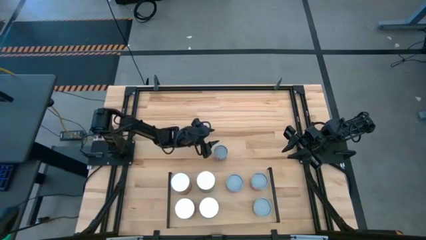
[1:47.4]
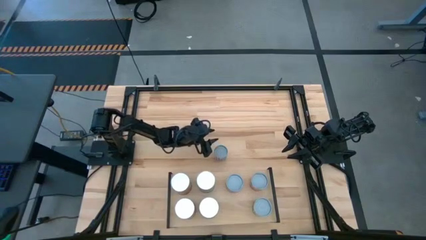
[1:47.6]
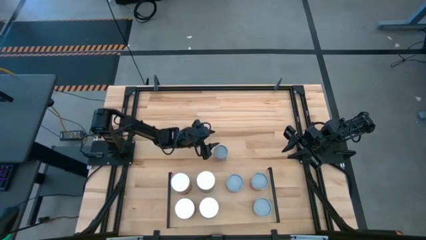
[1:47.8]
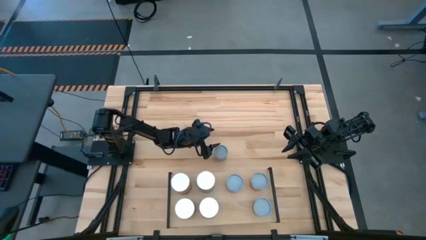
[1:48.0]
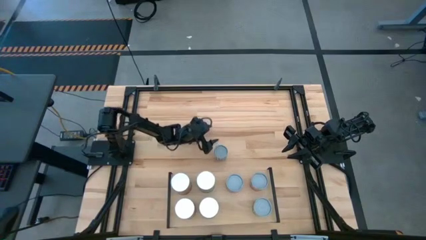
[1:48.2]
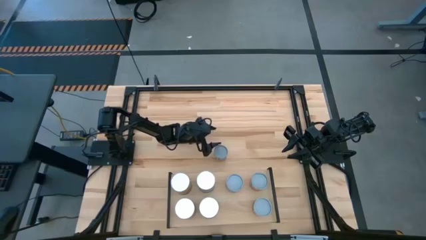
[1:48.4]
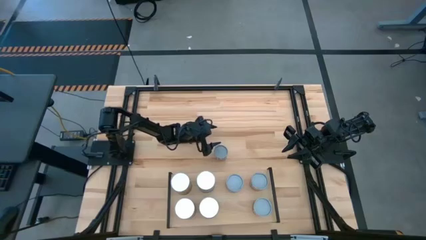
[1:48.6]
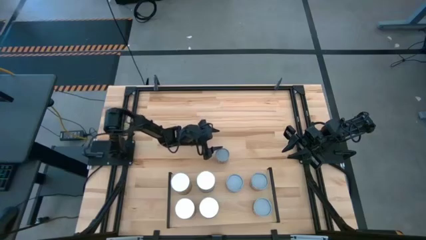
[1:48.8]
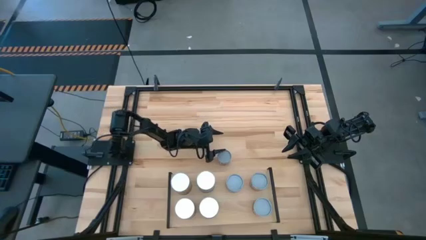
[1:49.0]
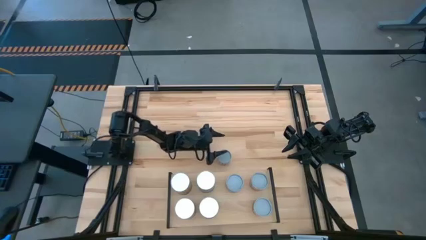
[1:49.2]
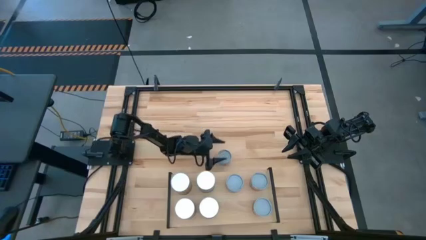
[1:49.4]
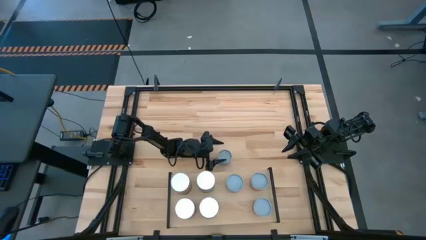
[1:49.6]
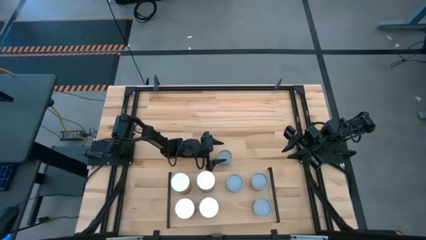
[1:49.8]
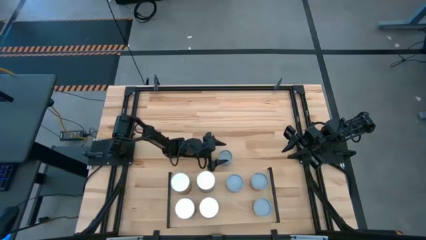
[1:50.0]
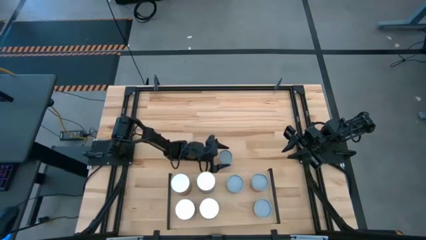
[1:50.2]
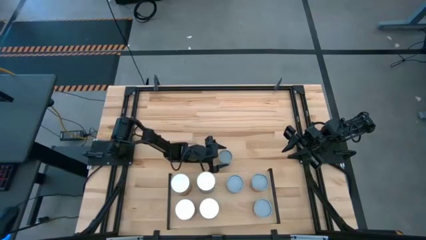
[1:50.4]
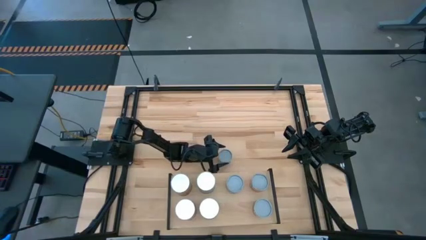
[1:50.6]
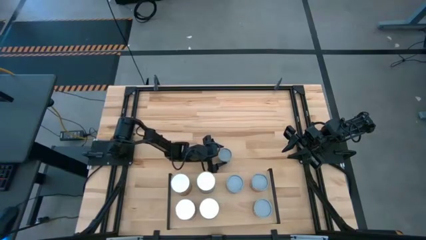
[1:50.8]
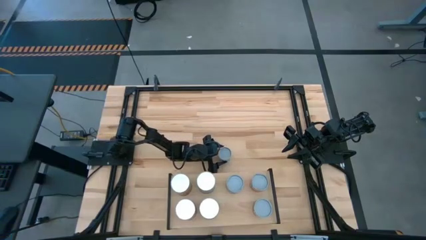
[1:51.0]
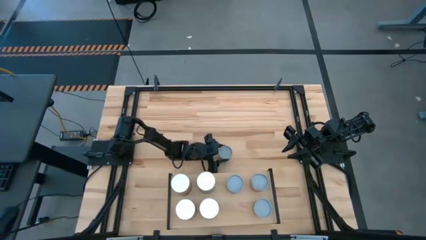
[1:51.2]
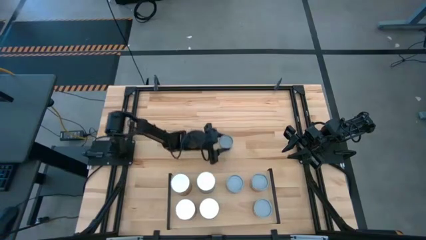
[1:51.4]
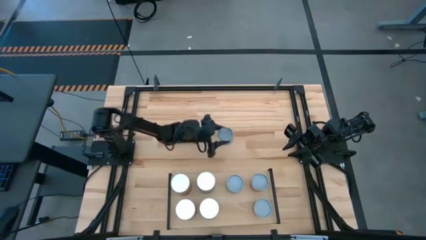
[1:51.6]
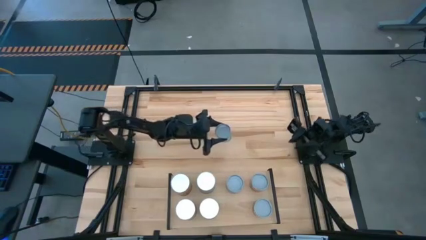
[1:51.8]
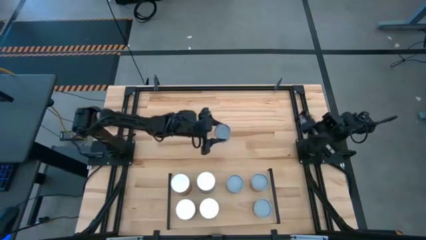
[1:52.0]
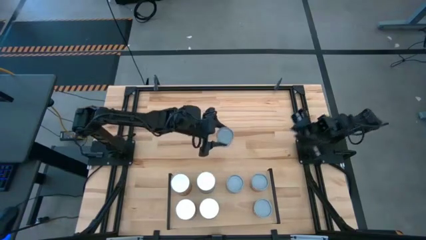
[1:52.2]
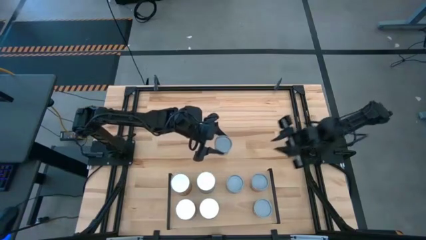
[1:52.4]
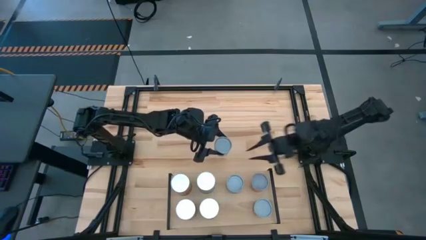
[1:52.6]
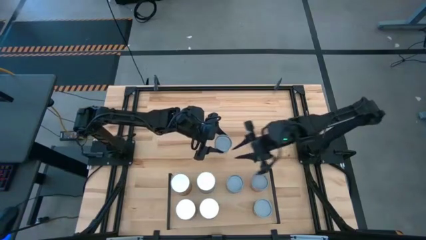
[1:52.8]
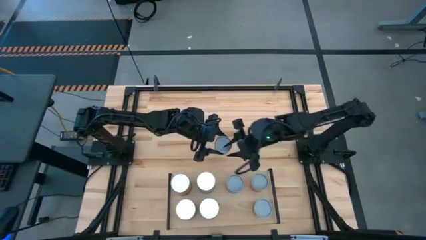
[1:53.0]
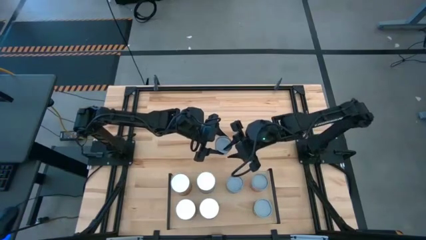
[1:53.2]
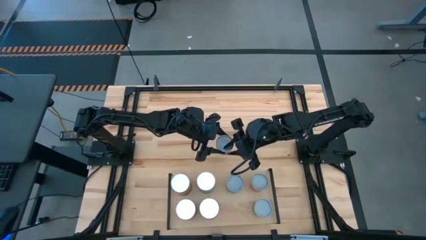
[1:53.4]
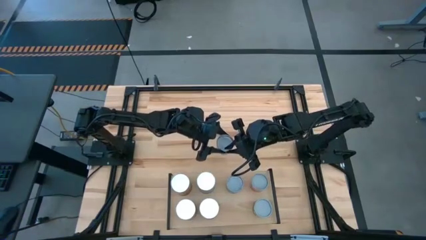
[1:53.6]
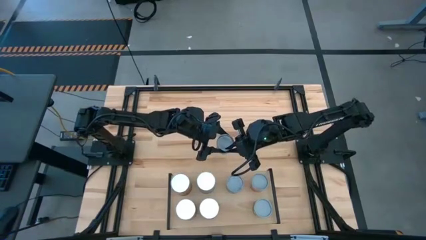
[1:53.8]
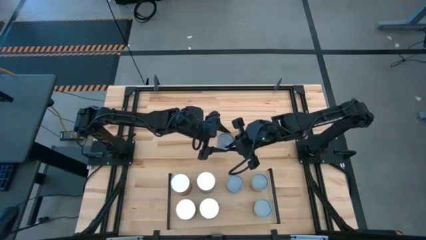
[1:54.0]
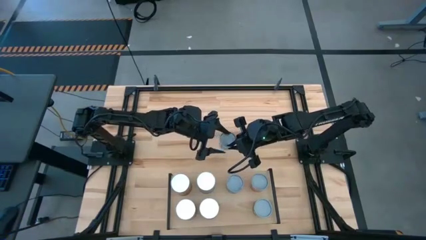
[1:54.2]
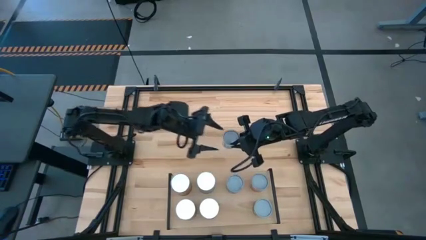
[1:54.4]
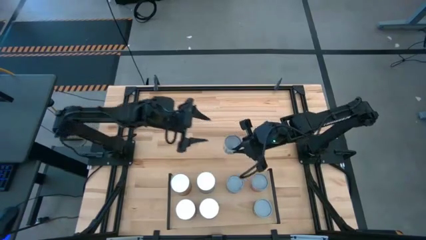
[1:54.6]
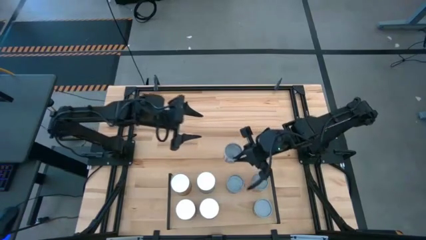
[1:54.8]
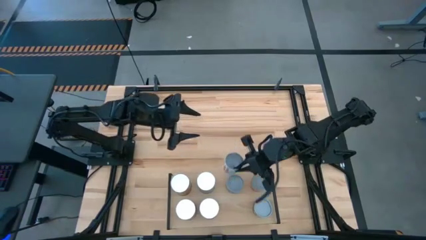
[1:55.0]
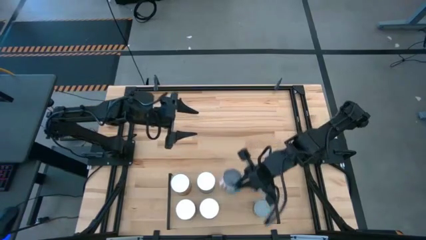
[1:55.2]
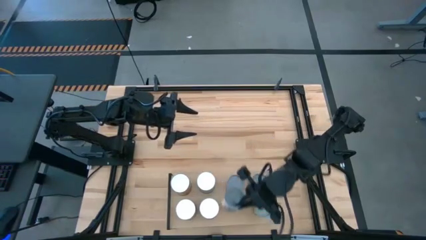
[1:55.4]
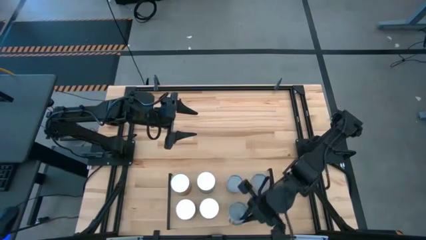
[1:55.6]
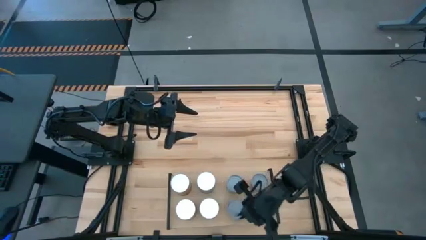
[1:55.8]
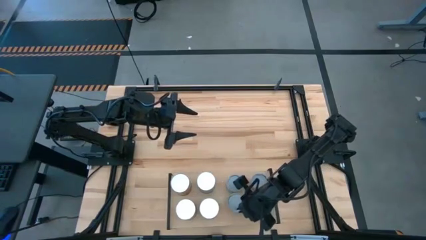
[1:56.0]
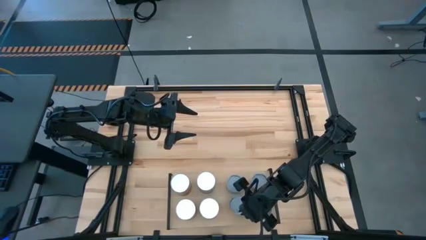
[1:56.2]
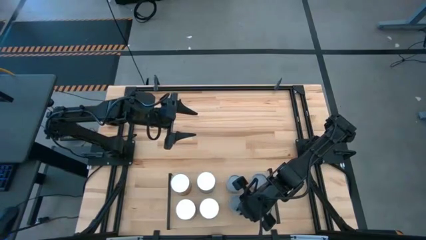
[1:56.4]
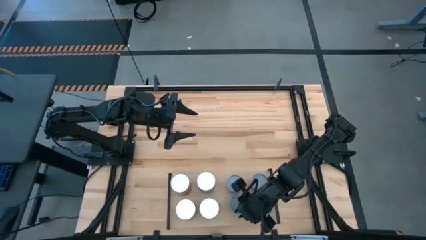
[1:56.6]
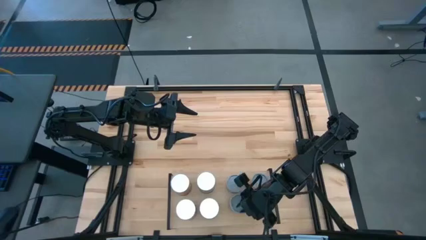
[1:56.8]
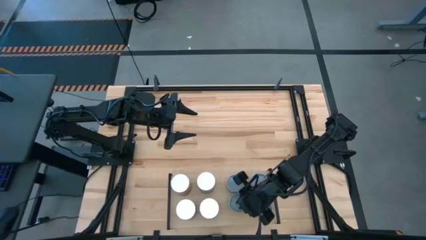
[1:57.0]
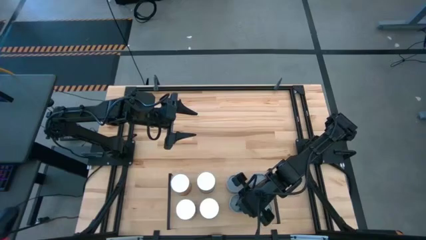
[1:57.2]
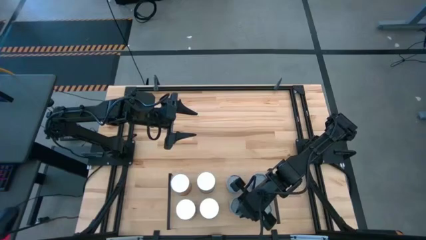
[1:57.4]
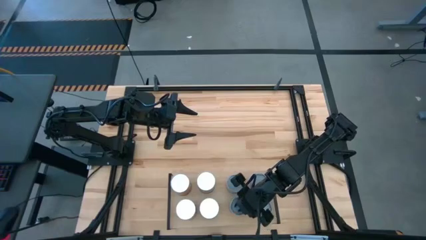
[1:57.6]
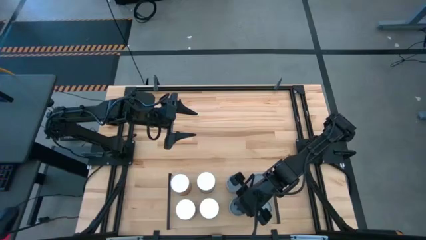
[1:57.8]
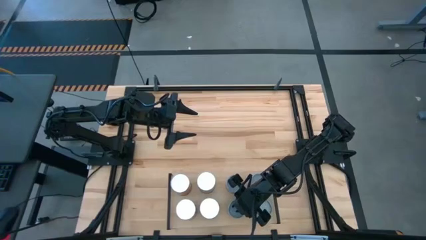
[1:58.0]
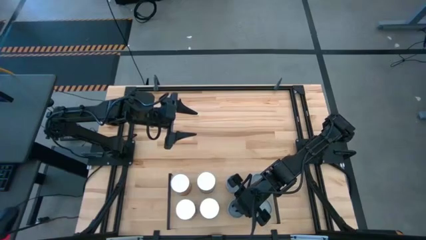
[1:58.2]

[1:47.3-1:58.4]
Task: Pick and place cans onto a shelf
Put the canned carrots on the shelf

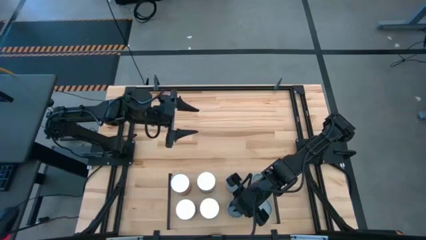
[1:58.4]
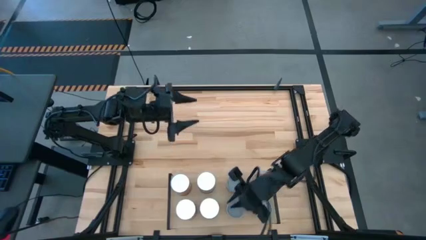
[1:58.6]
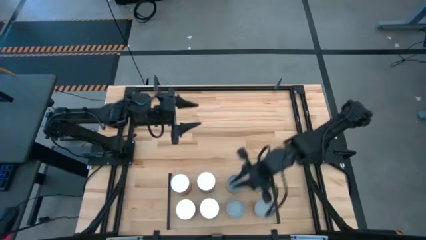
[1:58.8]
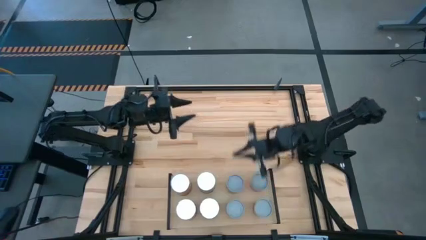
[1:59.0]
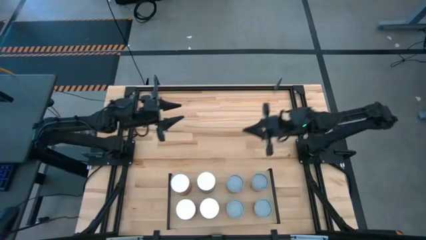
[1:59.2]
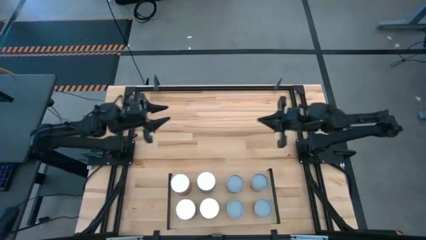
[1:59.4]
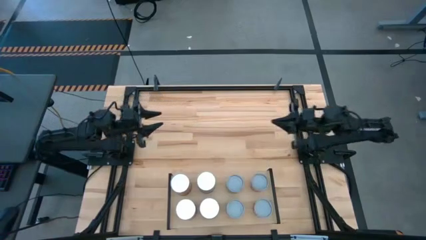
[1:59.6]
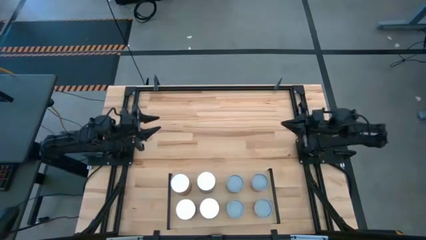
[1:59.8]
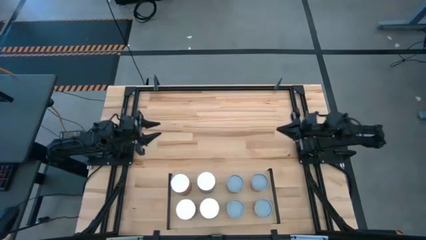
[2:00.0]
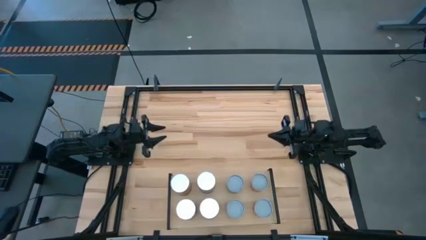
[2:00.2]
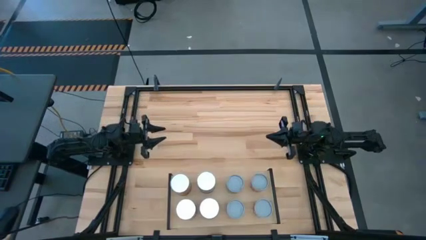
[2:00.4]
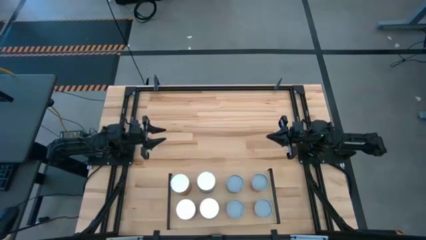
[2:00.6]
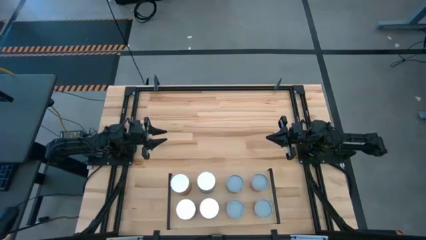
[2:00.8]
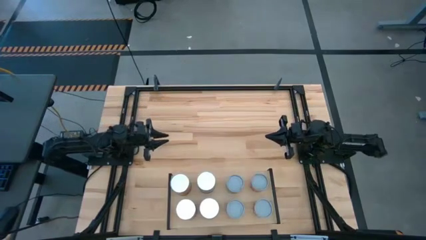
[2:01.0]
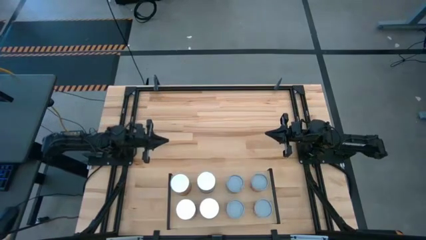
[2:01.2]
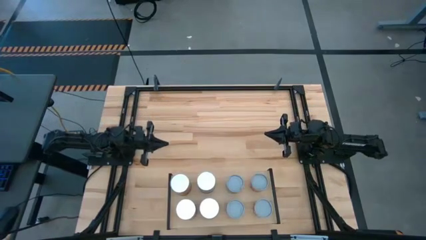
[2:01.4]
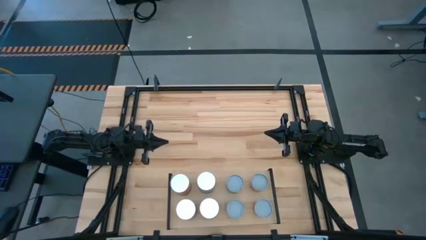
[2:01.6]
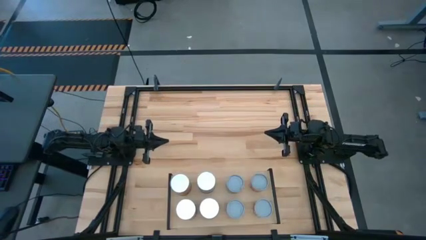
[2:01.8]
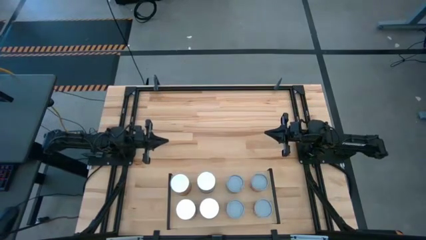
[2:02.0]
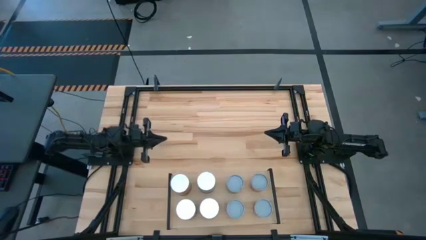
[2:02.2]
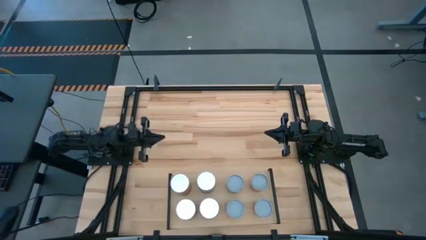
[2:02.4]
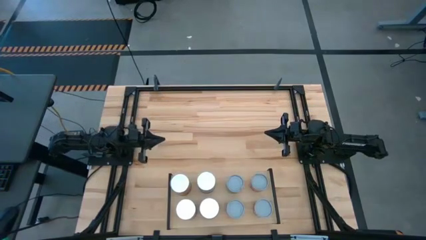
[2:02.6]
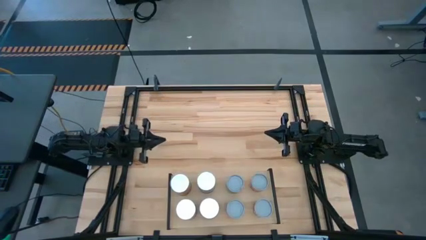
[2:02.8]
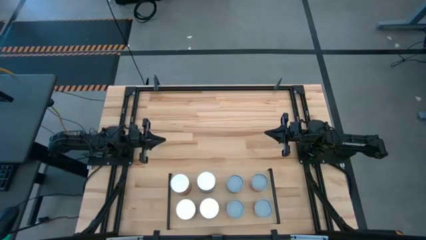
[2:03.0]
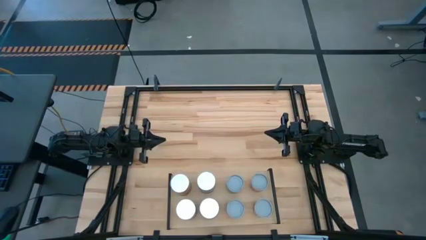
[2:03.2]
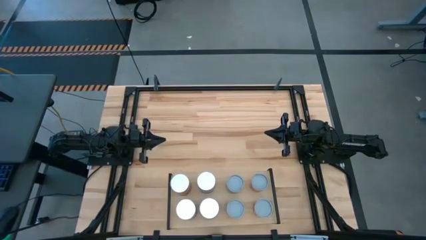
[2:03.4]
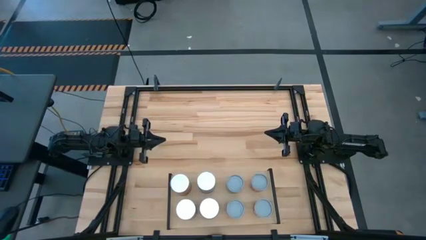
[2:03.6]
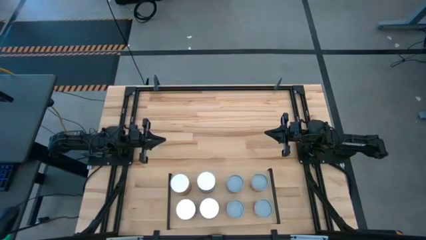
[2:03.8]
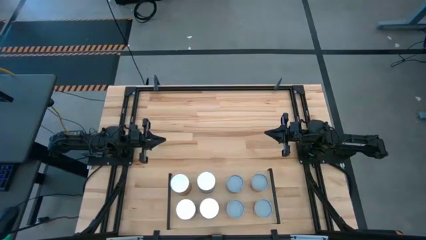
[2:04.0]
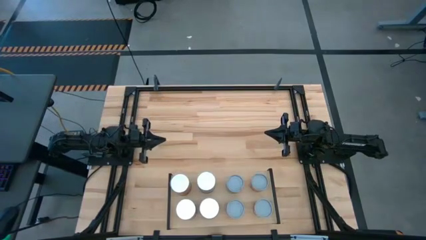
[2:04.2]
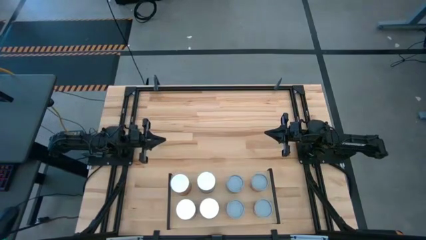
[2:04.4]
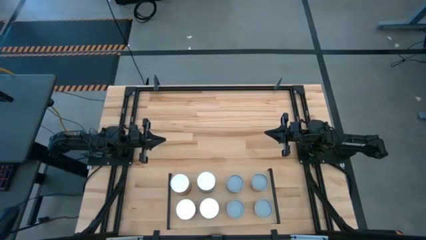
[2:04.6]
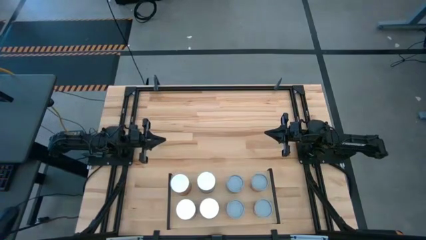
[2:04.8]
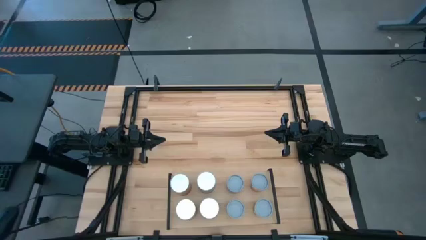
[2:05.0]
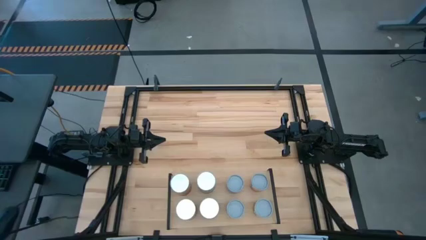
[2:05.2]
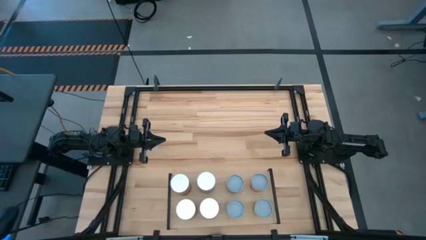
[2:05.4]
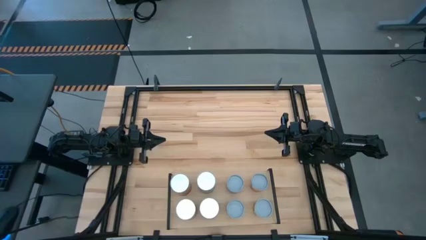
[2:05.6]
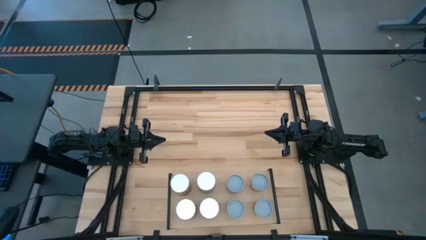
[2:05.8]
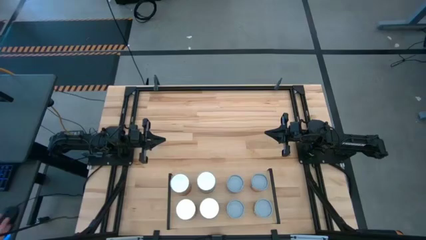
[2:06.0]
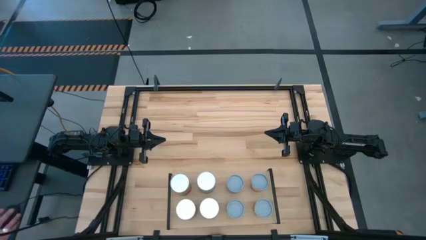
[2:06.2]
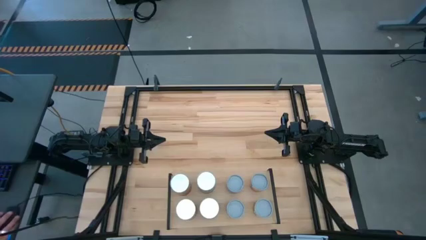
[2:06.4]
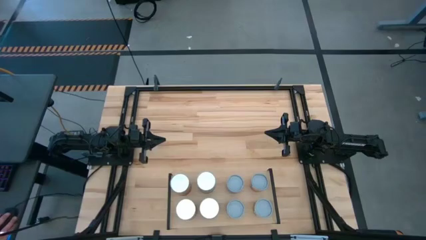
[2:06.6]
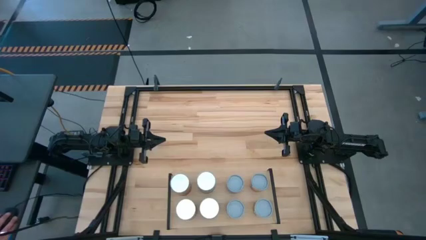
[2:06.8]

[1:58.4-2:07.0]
Return to Home Position
